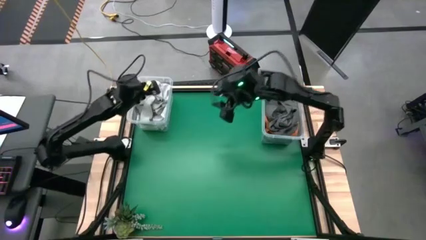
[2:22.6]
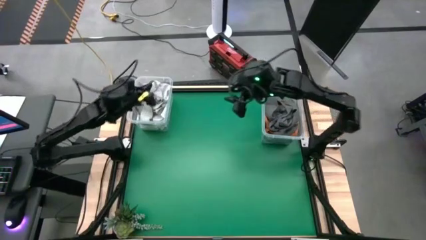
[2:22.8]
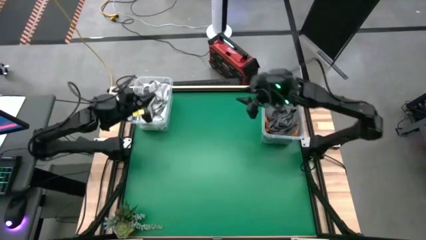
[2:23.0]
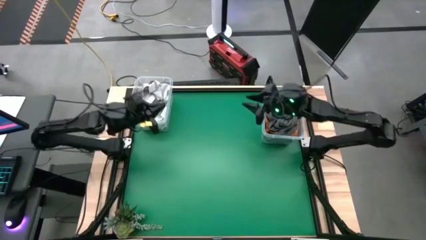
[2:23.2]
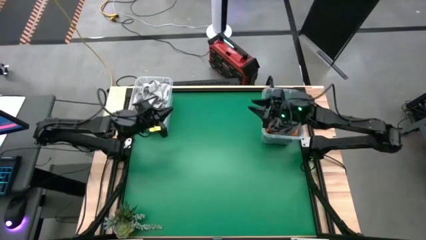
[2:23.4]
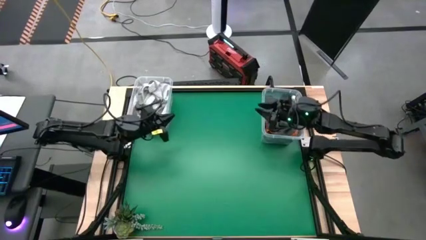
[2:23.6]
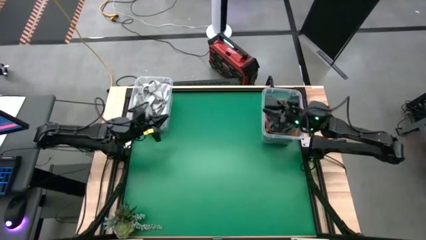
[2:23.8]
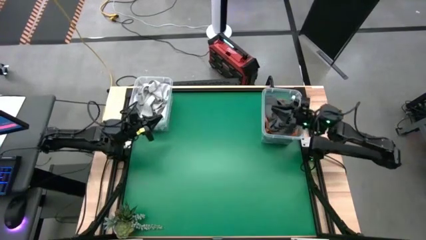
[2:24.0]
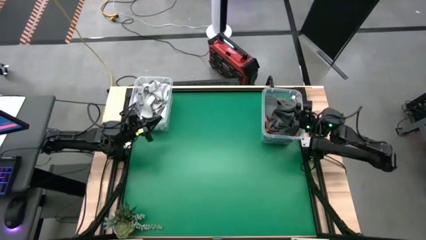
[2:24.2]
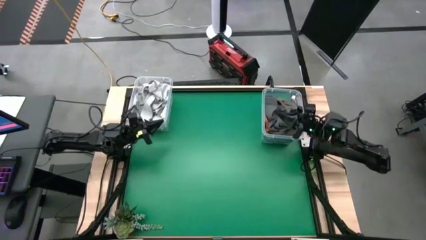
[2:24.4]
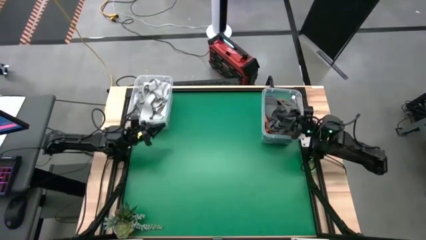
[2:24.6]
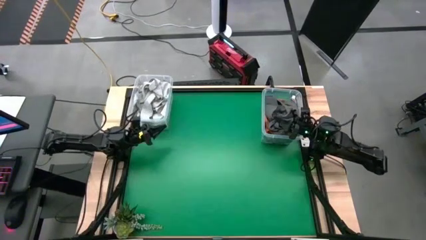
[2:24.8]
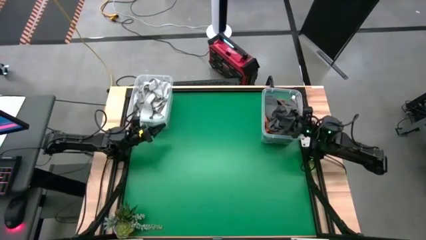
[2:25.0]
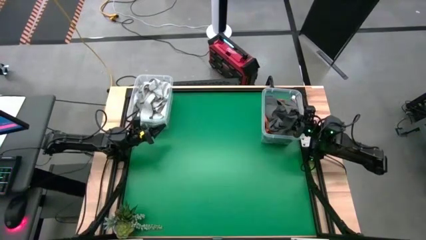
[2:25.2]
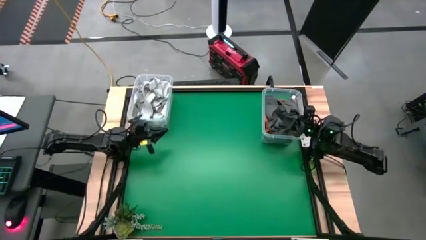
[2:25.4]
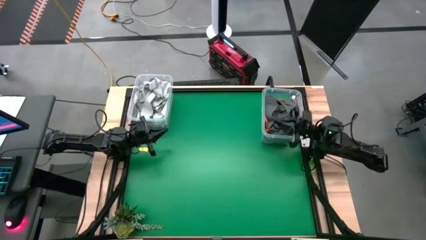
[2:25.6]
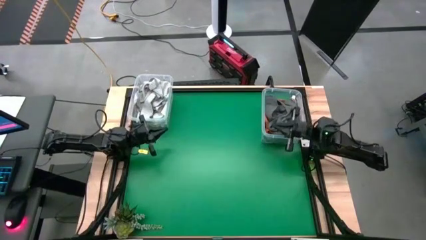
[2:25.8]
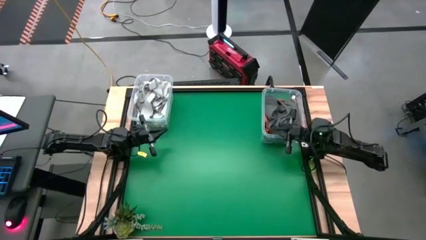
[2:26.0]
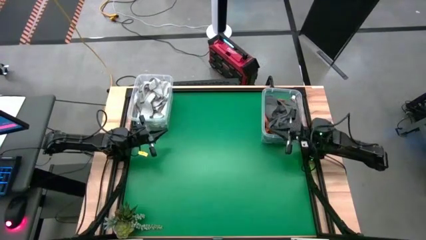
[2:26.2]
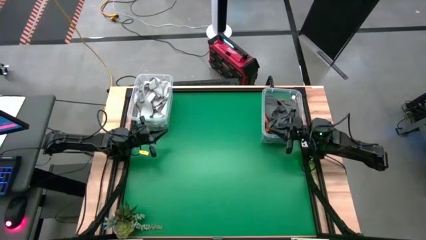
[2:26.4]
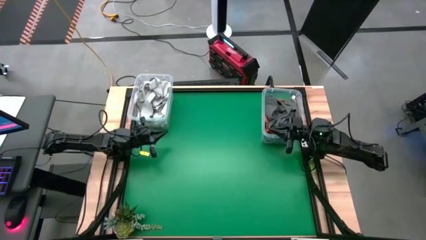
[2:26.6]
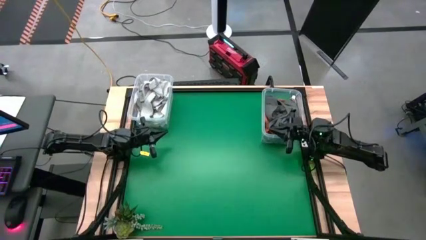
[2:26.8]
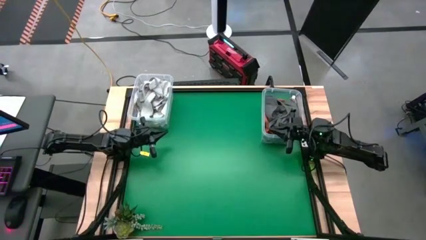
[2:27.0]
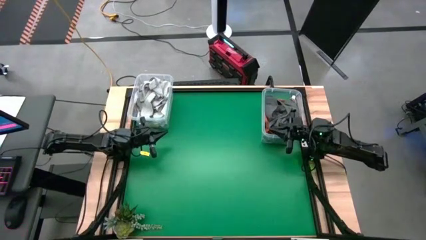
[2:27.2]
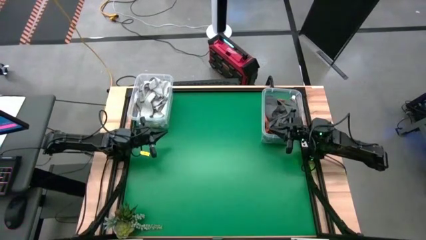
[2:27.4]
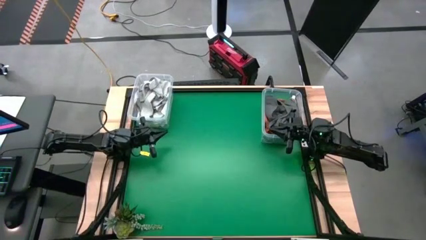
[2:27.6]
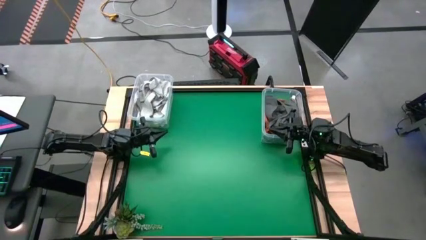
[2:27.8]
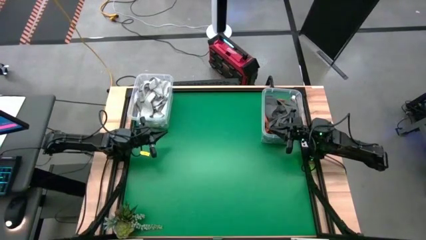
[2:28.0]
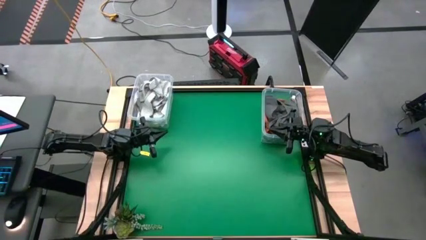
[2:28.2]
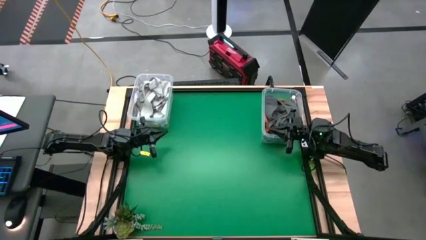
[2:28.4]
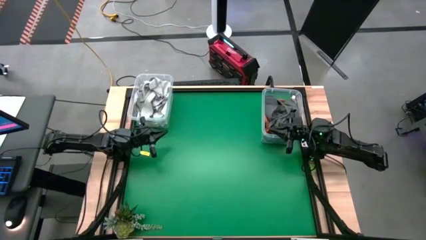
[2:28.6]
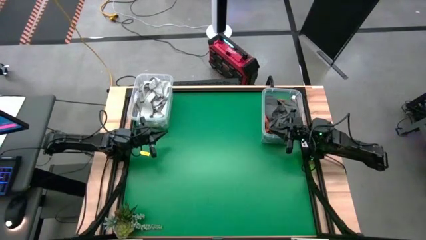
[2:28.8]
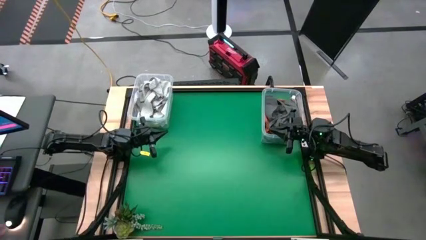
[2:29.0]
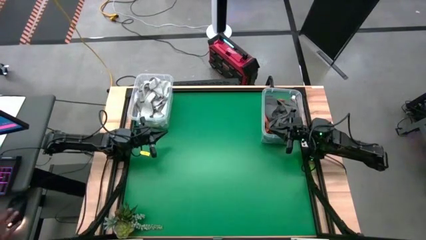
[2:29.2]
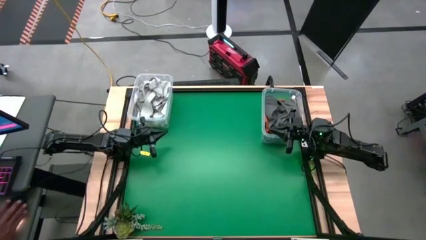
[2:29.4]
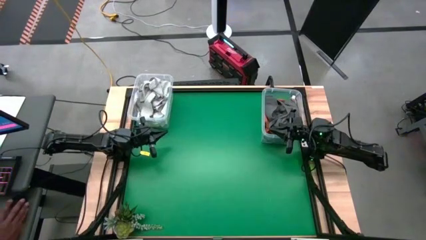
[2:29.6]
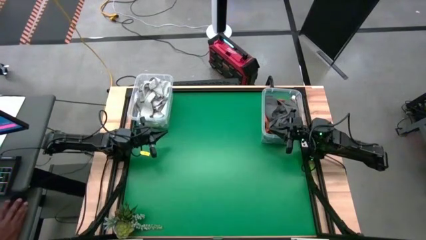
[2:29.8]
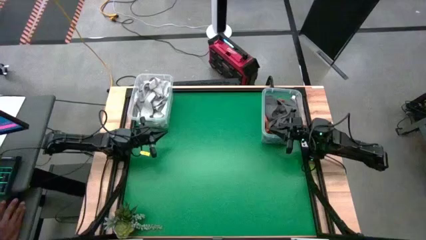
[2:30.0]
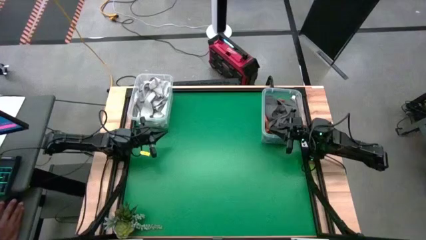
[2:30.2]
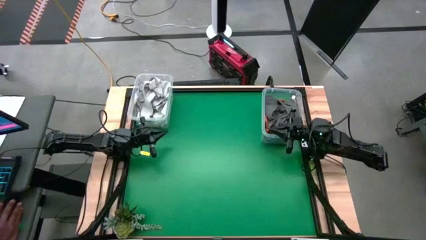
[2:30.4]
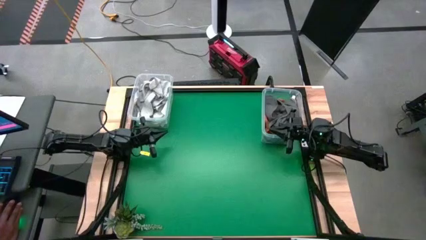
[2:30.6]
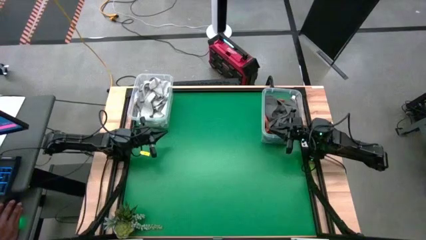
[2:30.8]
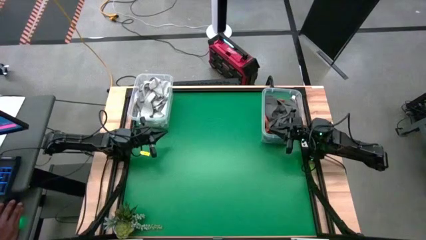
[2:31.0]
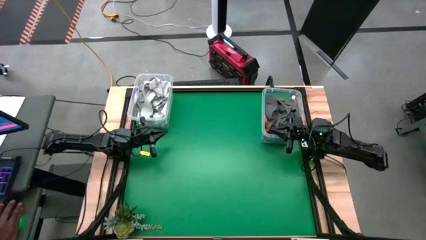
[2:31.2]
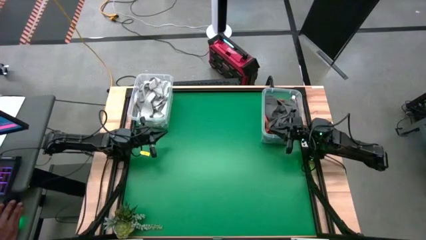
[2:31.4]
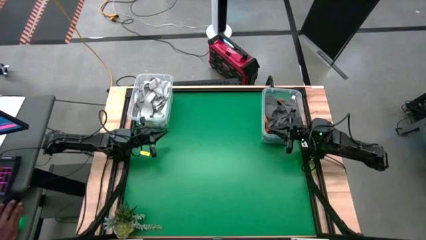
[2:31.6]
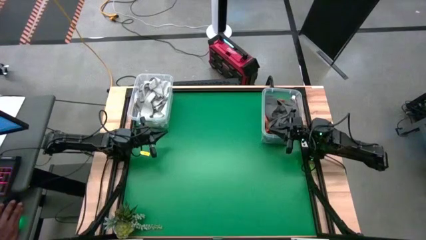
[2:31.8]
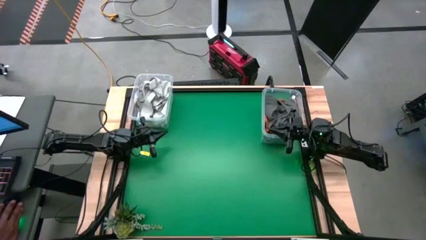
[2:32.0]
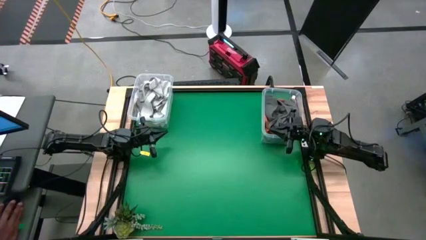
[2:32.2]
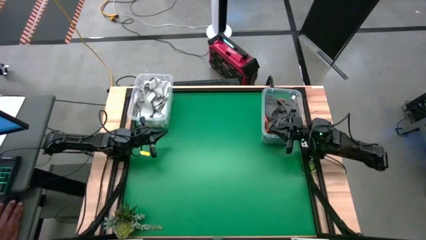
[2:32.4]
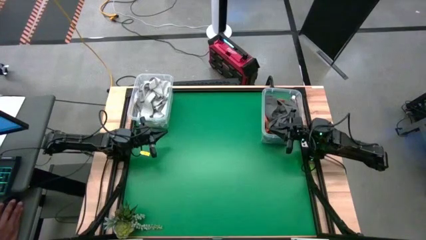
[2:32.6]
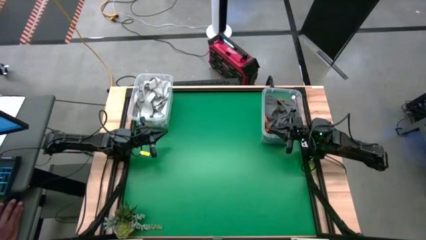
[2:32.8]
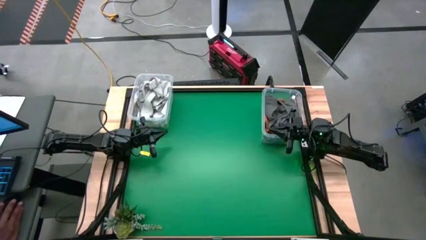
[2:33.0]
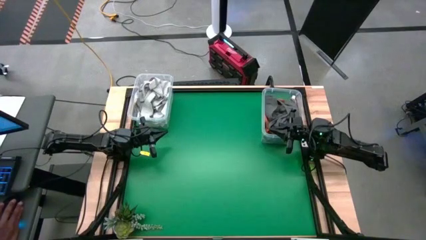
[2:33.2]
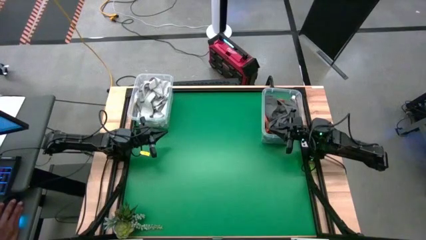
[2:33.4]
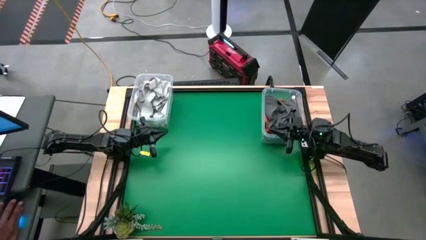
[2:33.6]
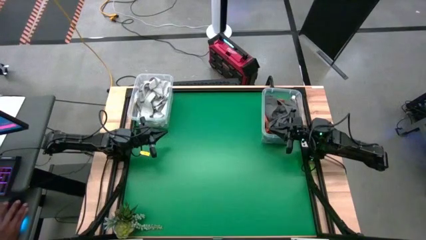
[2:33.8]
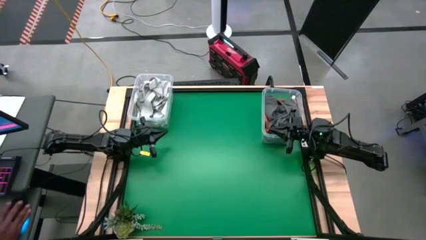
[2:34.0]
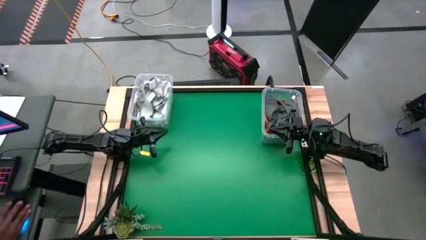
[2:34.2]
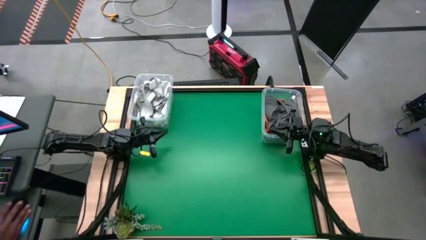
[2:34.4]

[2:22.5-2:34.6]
Task: Sort towels by color in basket
Return to Home Position

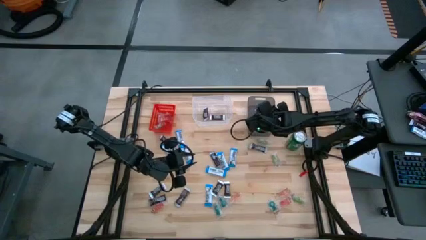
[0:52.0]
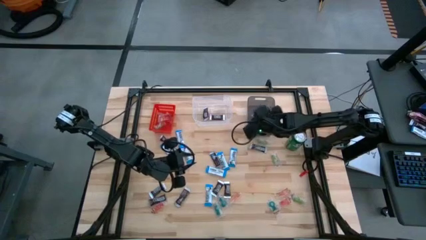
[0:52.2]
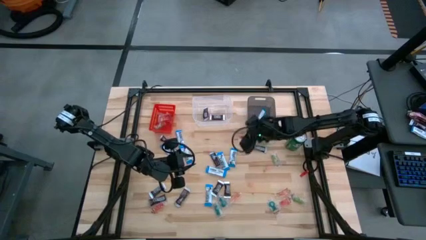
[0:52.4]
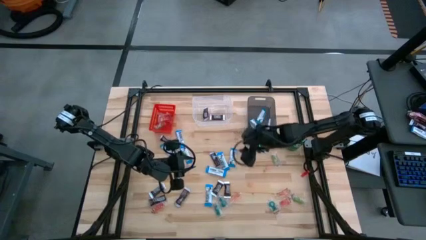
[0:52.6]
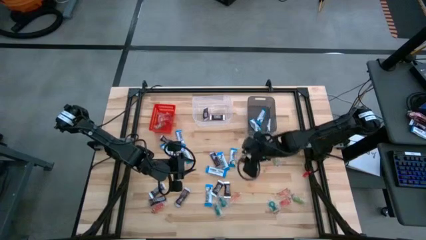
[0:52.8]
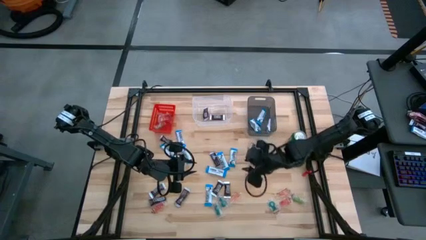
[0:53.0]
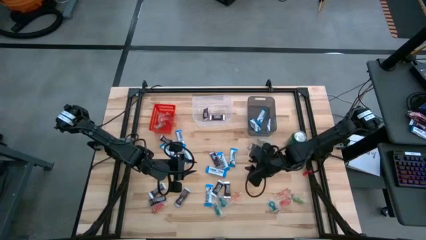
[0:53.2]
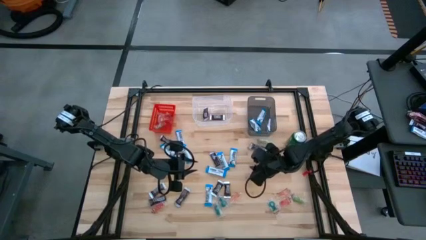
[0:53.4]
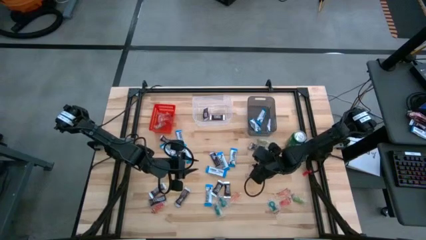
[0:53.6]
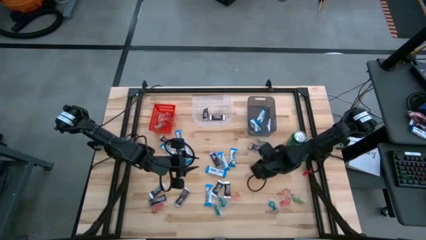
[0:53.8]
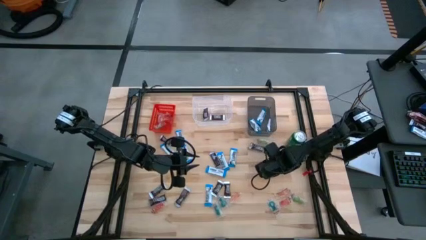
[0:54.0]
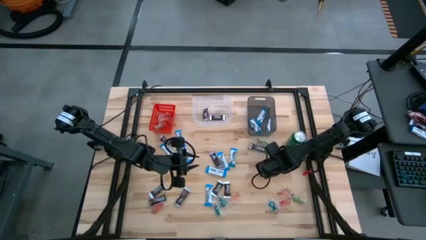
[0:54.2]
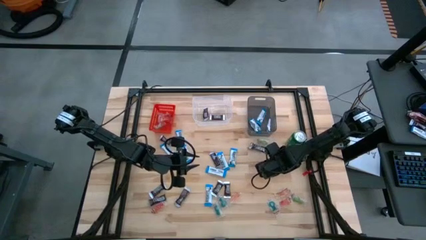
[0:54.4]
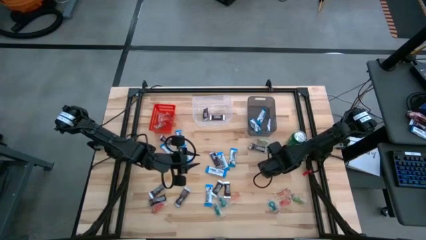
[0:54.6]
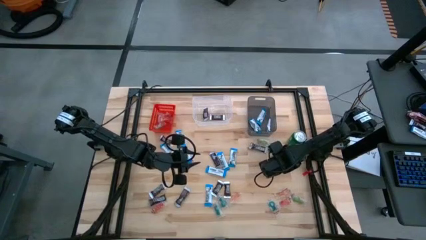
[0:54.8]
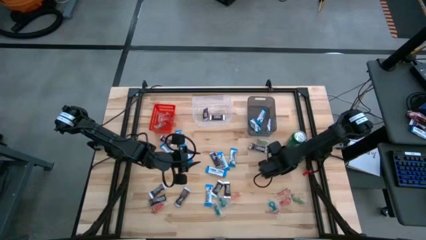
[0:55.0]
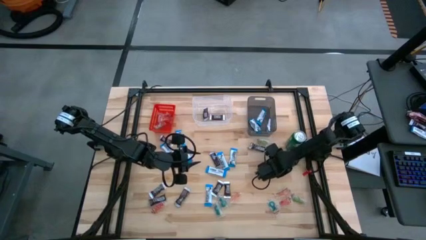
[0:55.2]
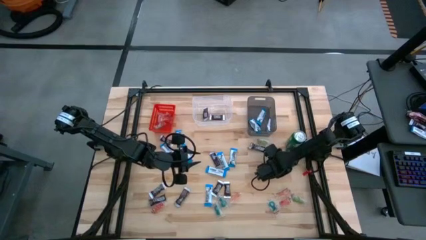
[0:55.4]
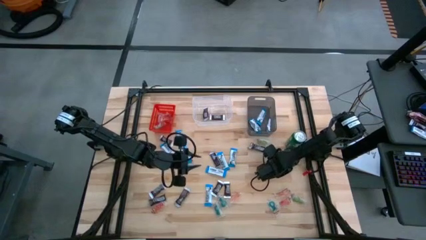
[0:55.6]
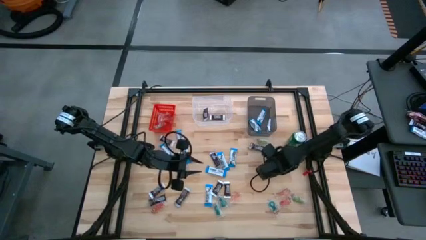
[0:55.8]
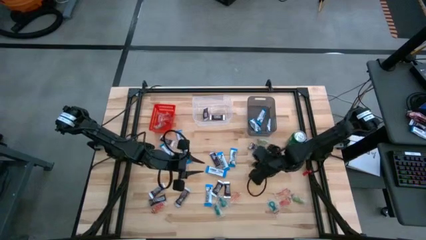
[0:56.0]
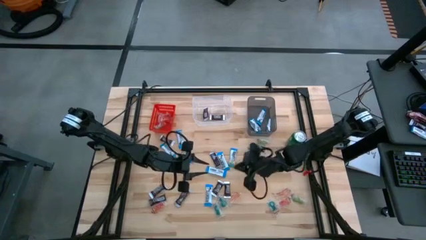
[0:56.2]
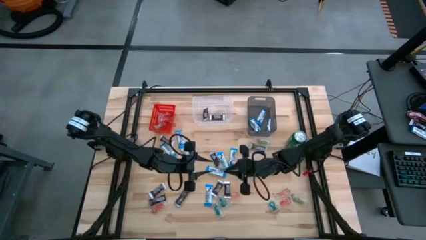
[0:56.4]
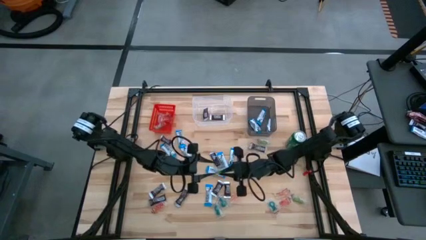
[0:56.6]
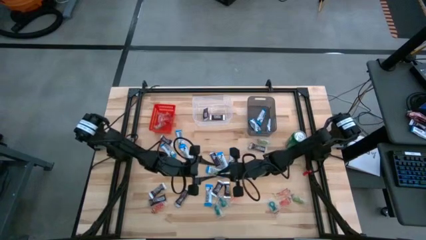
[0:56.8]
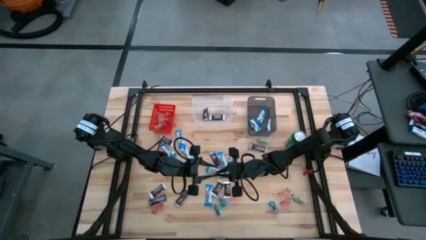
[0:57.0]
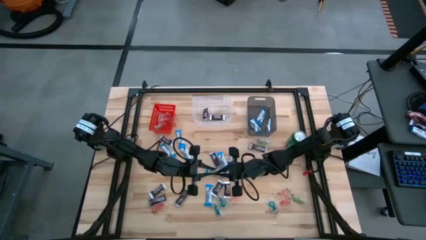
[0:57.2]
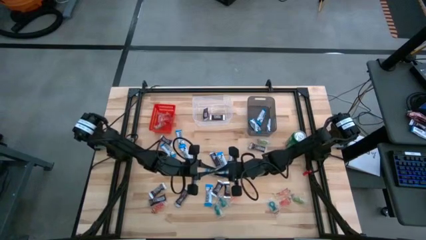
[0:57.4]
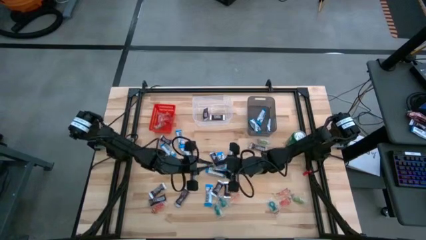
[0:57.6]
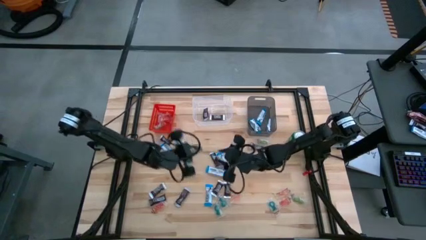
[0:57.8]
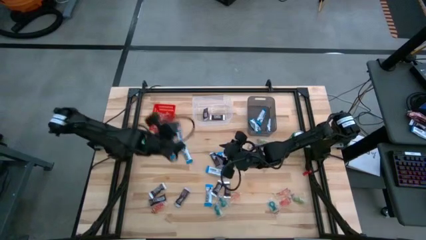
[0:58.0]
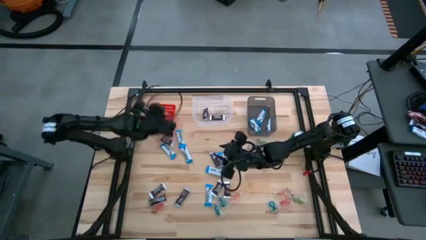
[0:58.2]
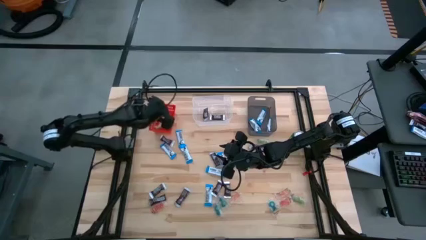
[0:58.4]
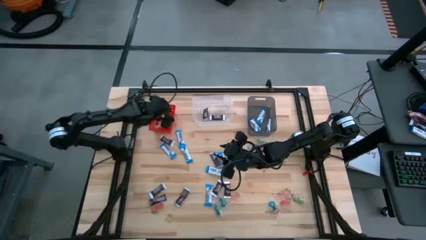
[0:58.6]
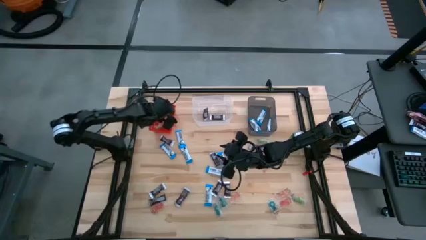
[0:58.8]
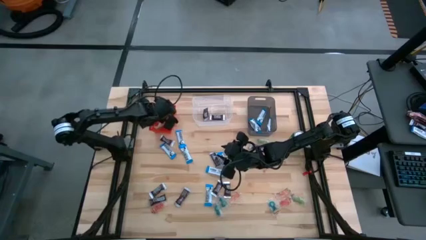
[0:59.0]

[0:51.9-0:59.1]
Task: Sort candy
Put the green candy into the red bin
